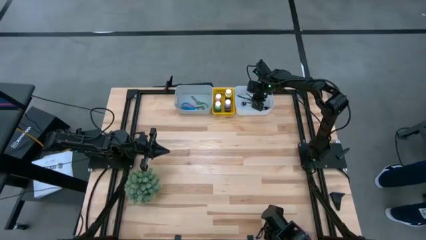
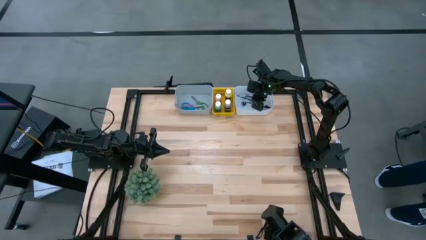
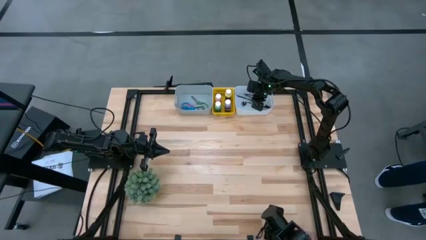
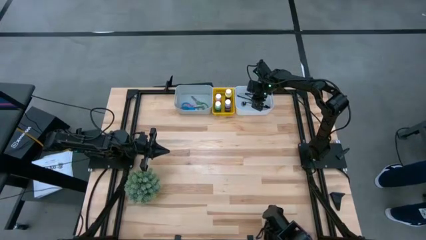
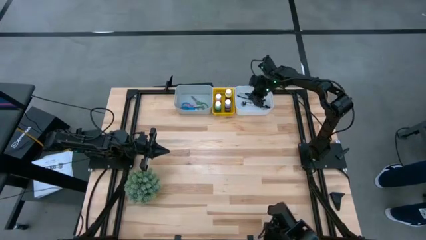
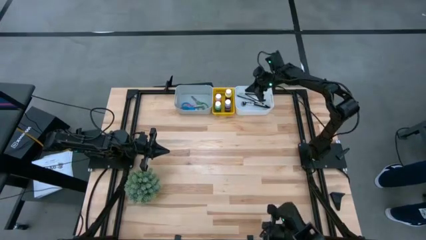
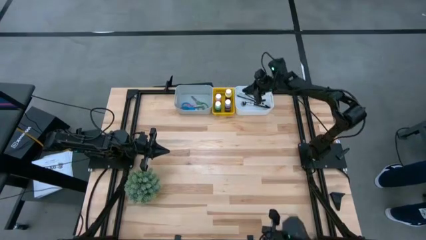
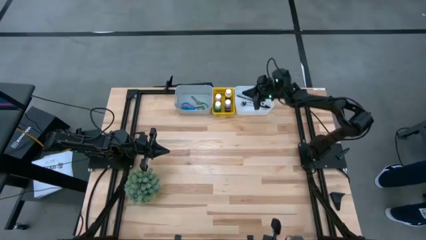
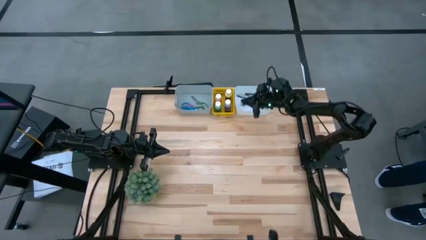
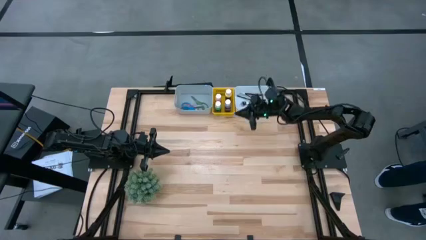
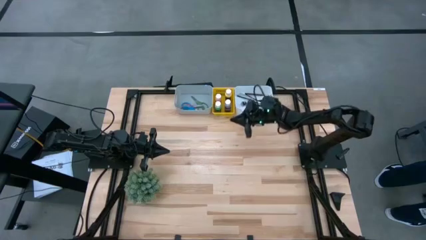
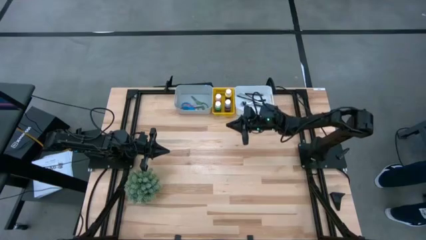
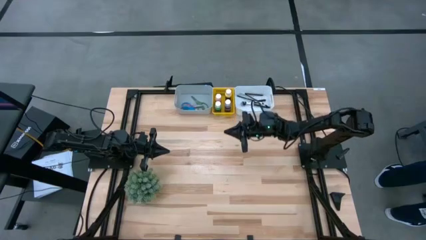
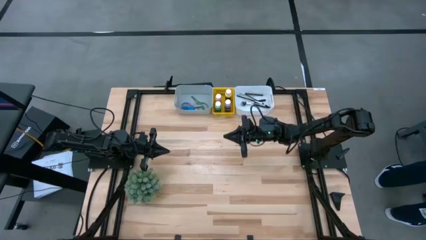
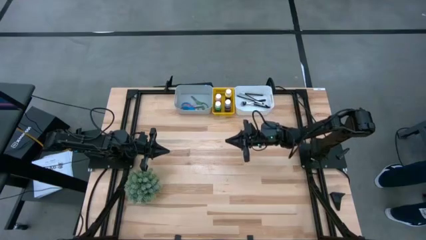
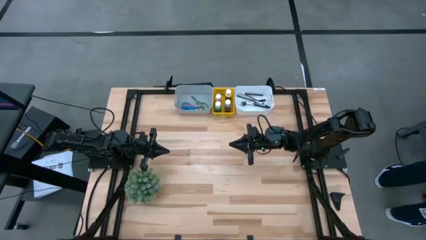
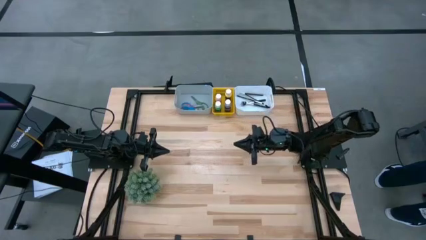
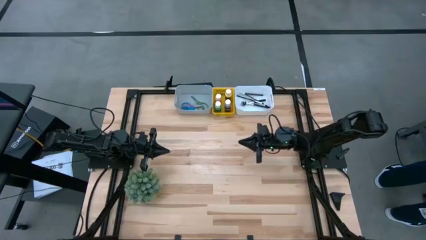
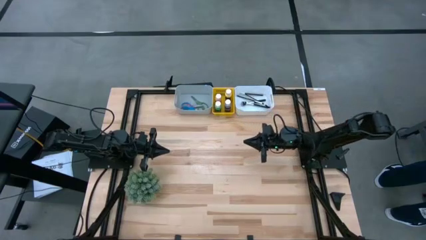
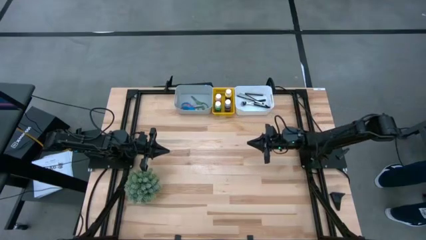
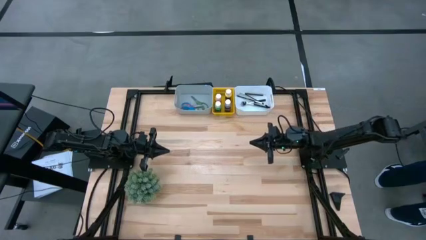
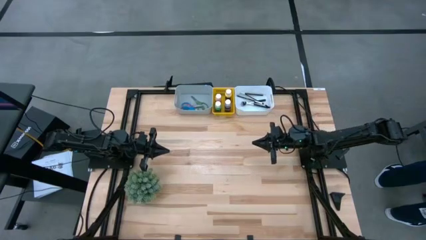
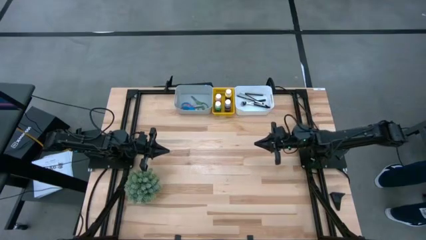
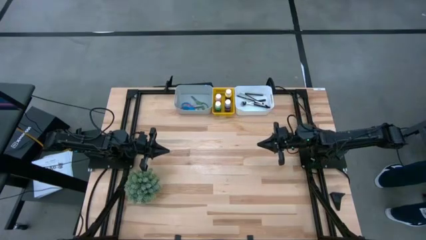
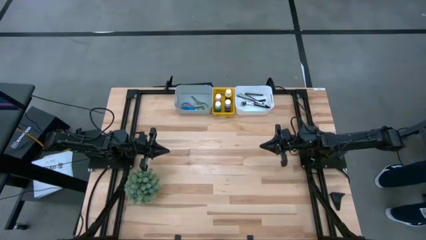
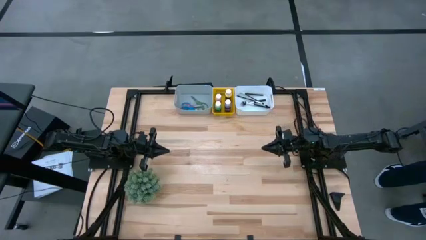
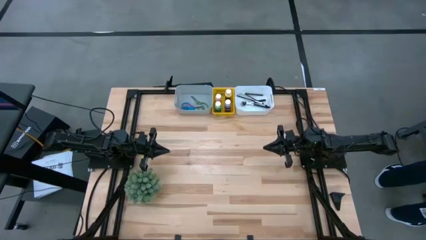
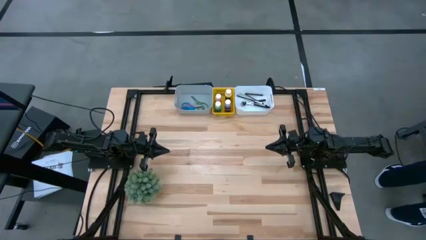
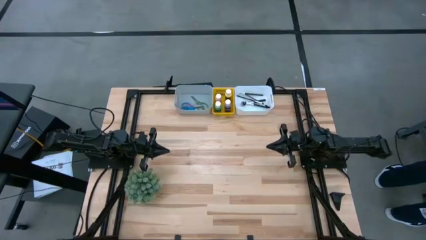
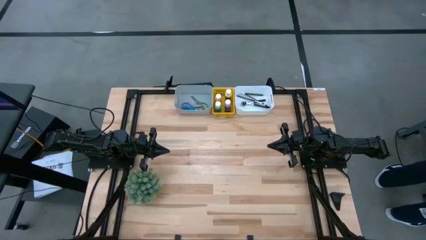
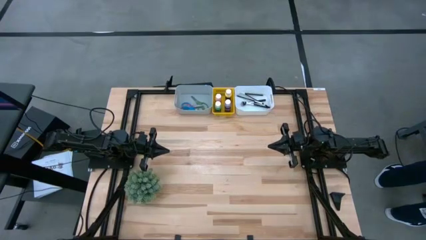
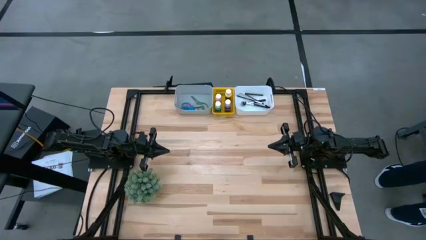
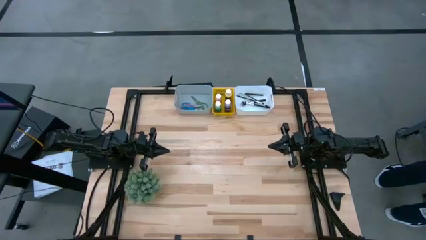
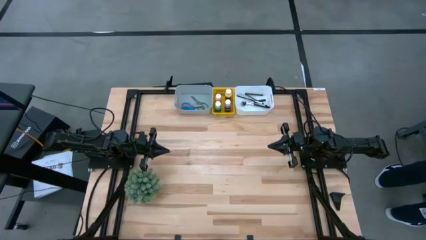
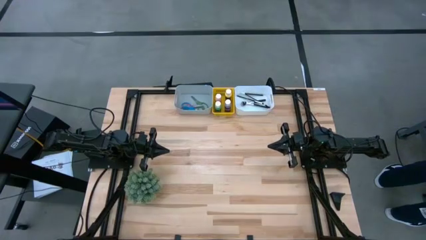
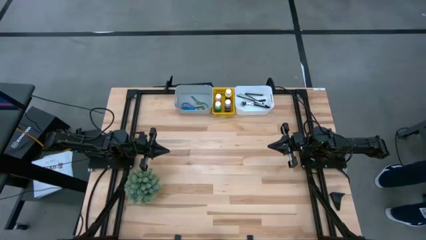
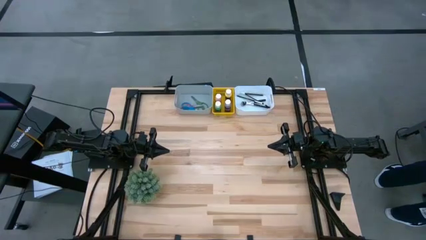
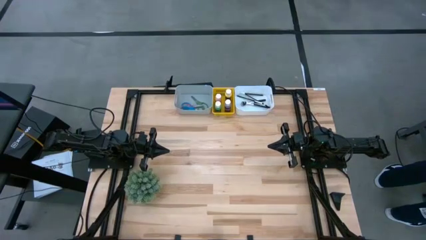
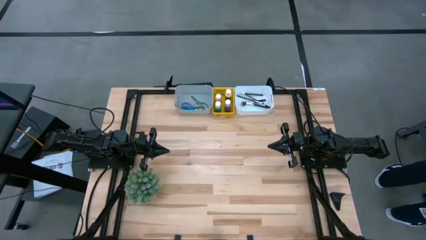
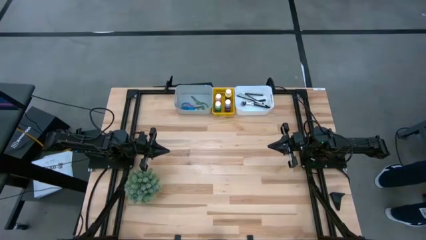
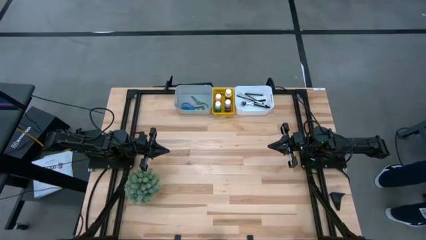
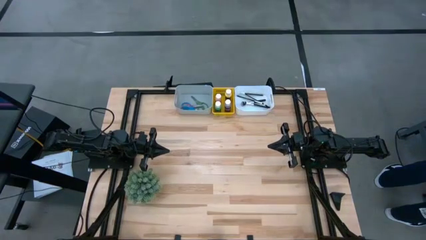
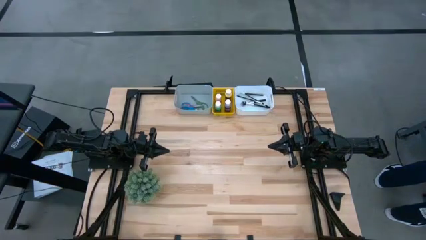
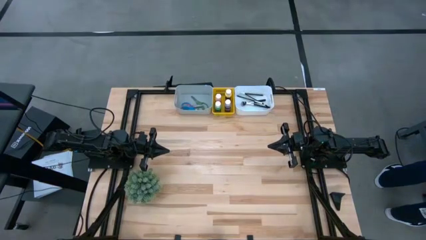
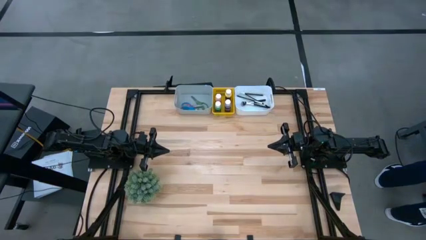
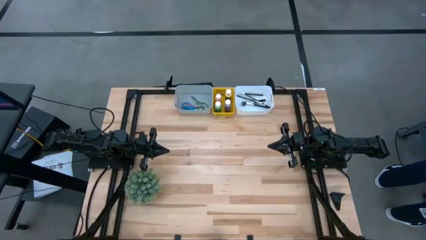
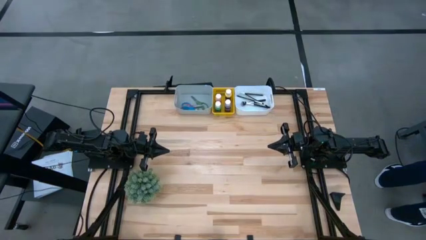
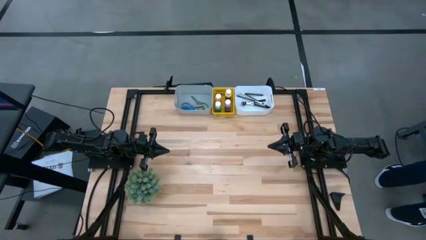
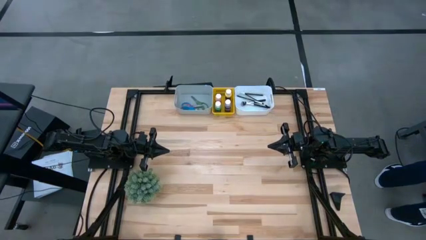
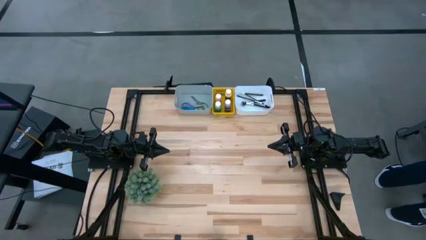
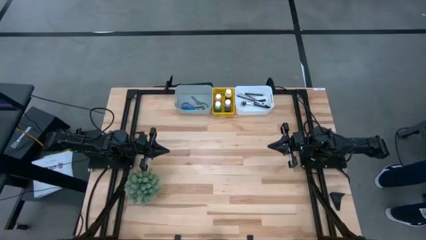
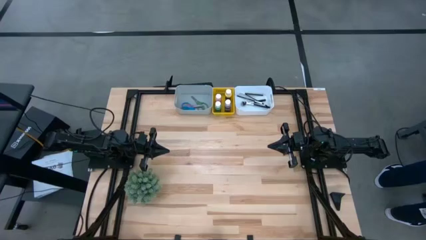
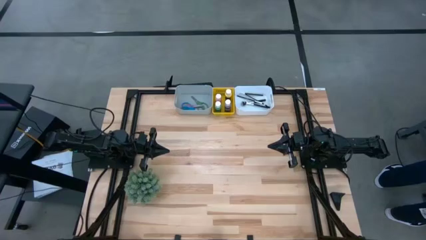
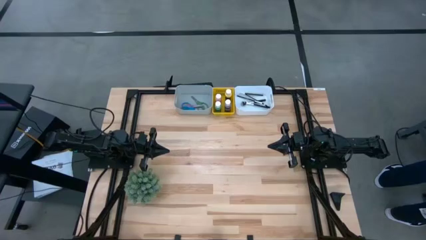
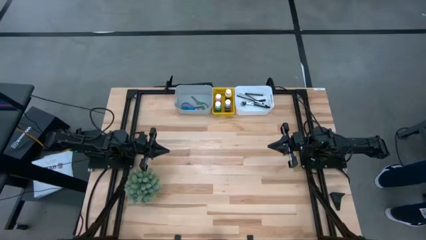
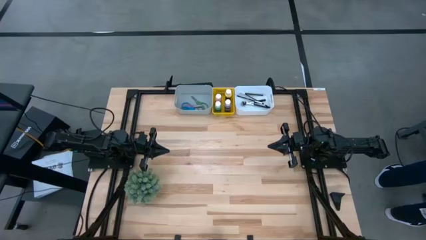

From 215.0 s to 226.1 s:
Task: Pick & Place Paint Supplies
Return to Home Position

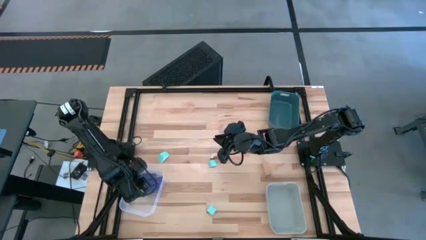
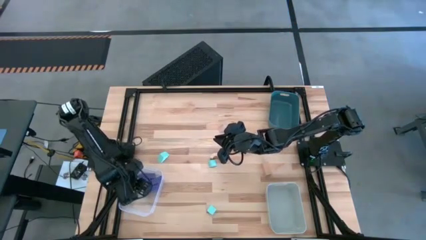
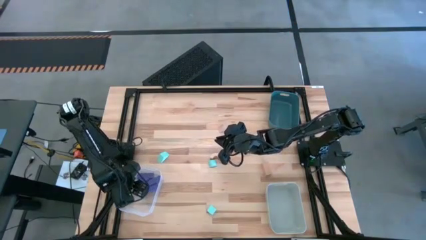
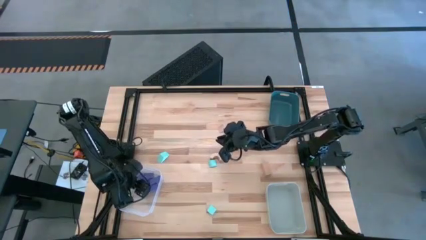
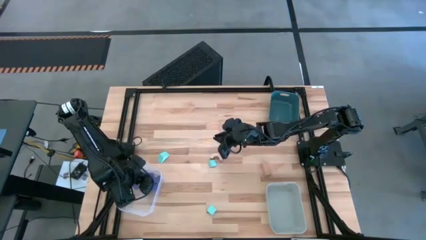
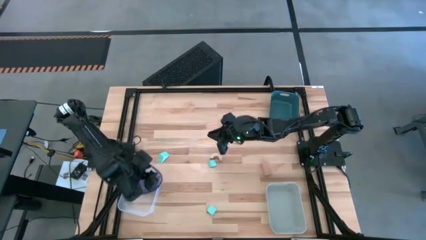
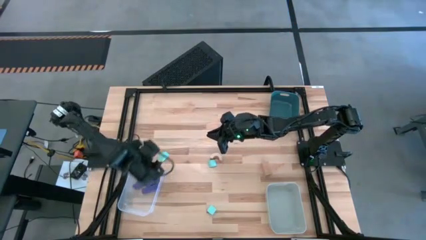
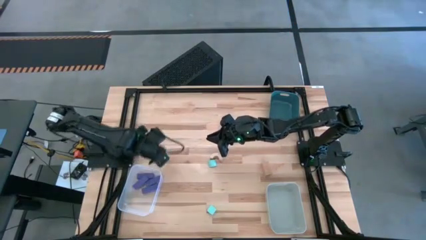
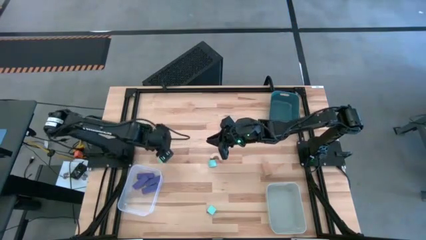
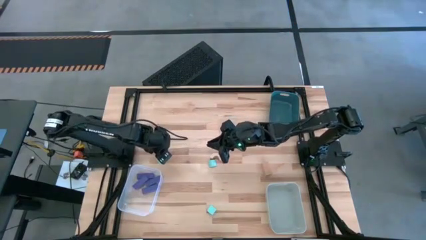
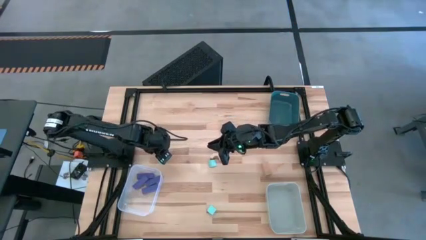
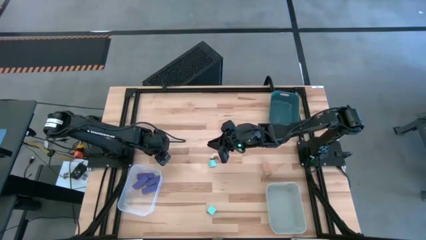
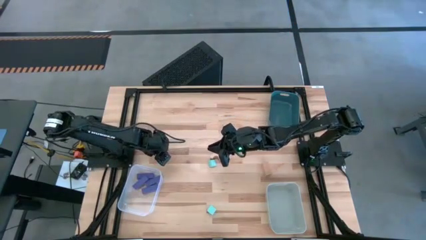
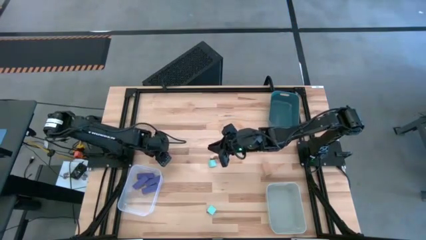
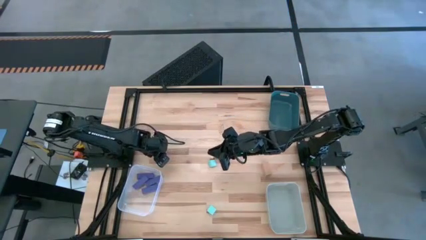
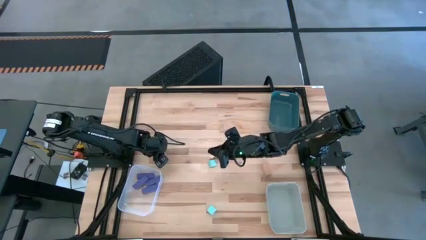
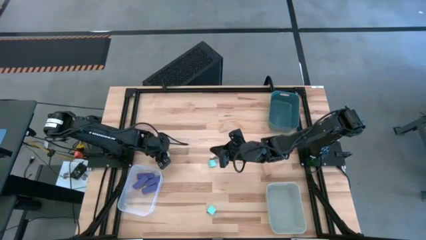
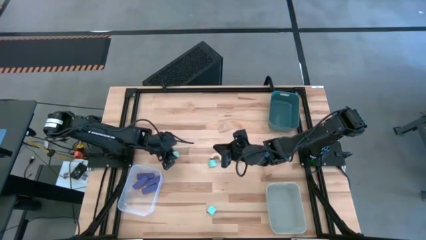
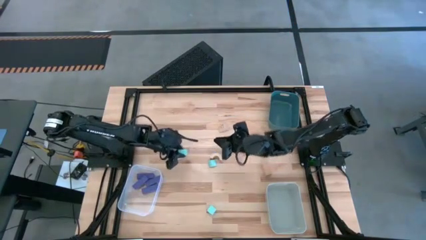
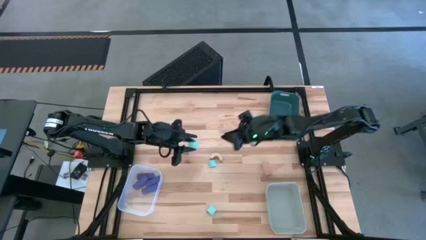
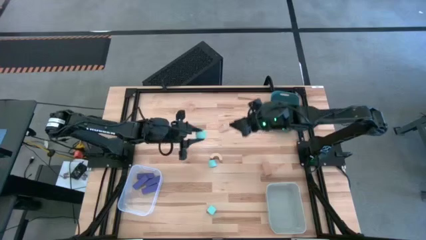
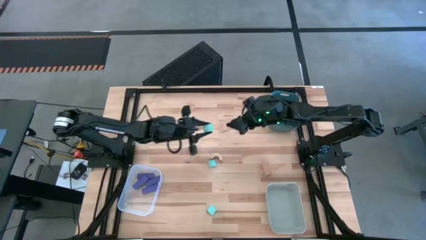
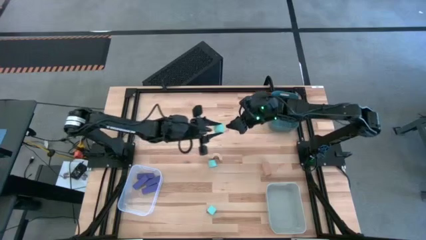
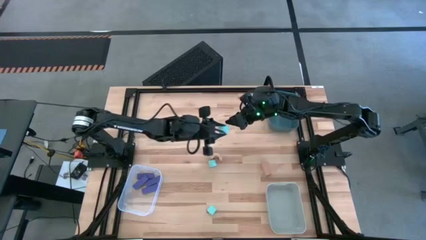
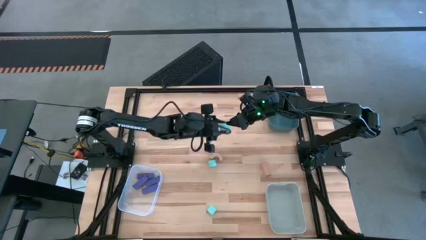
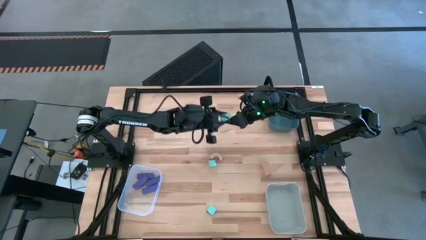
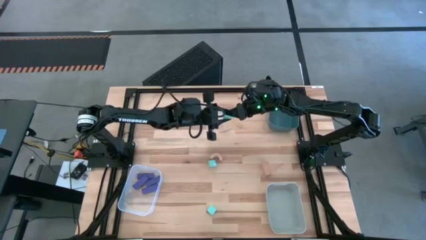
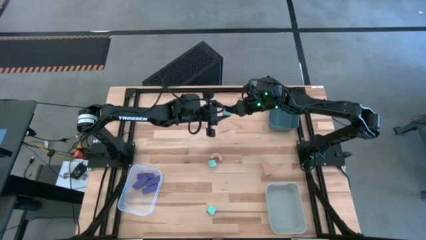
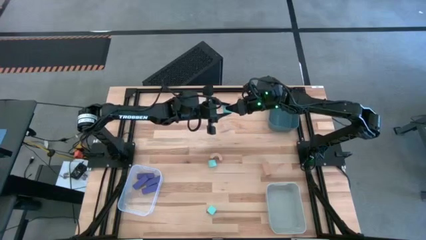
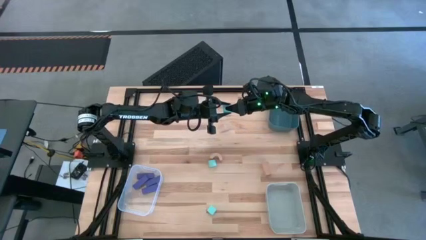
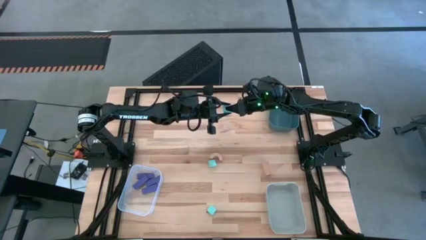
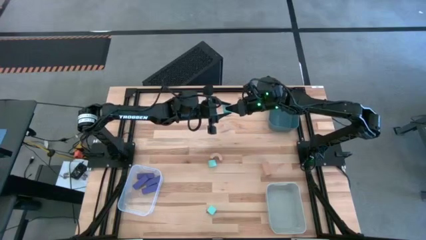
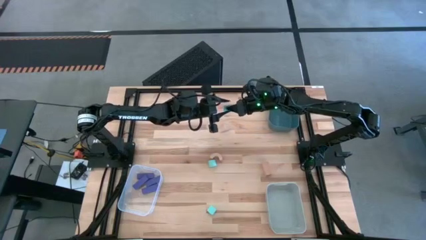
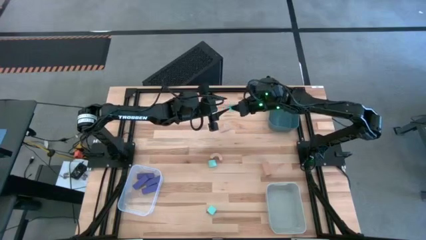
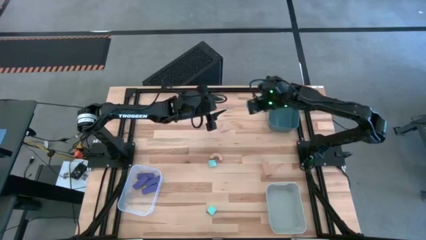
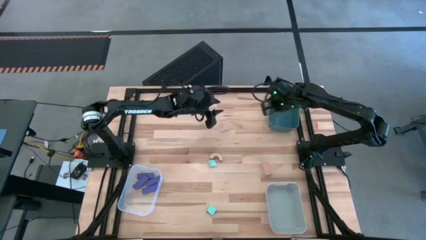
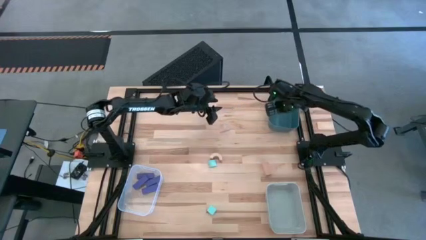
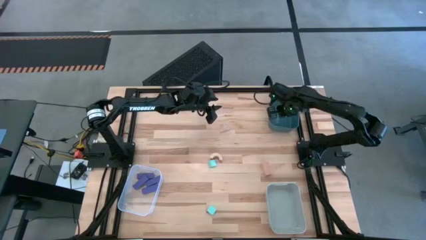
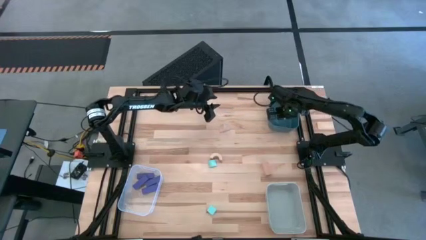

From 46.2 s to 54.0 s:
Task: Sort & place blocks by color
Put the top left blue block into the blue bin
